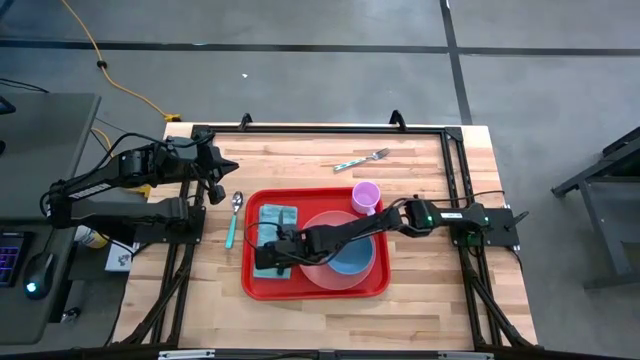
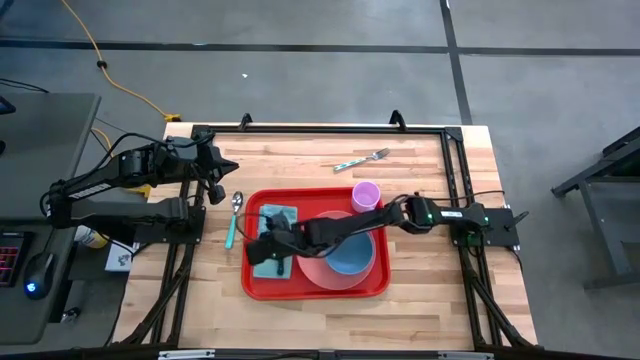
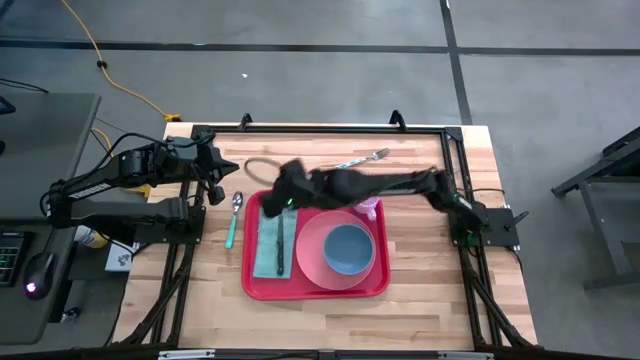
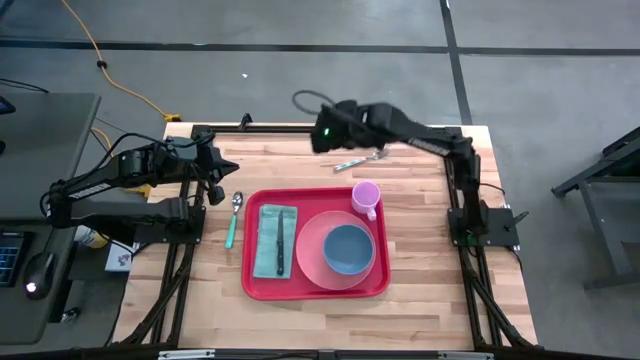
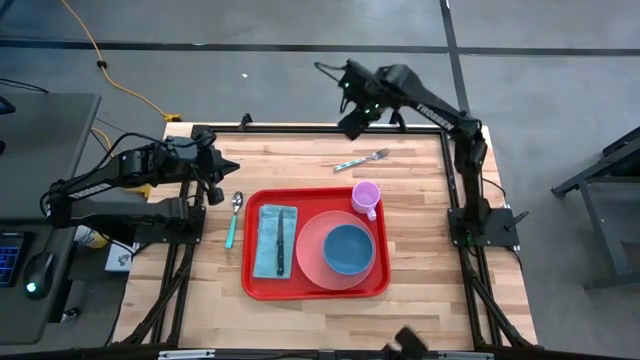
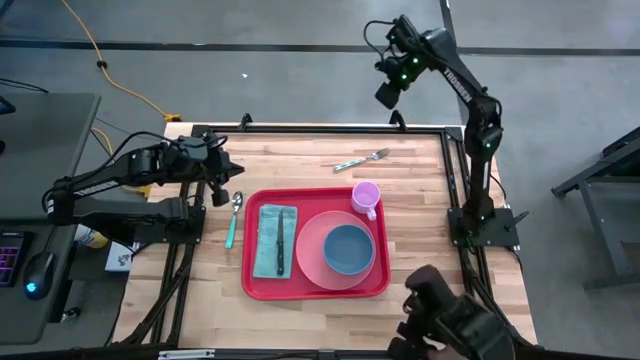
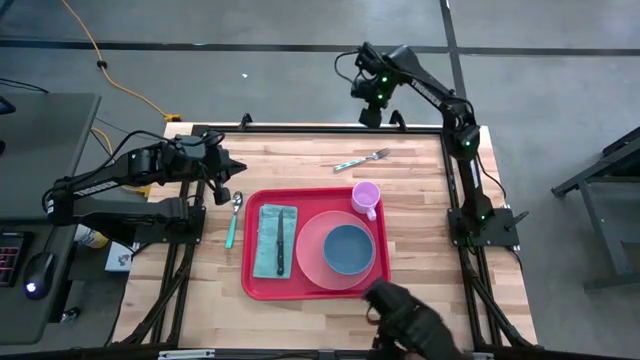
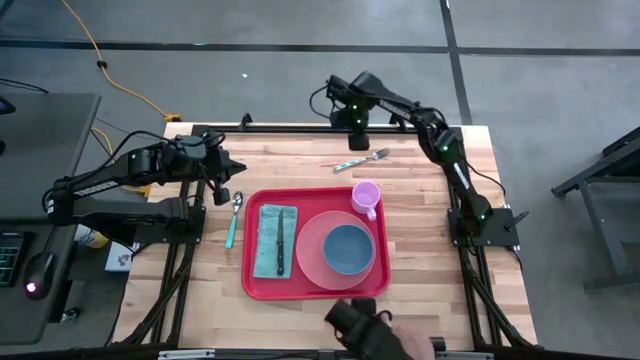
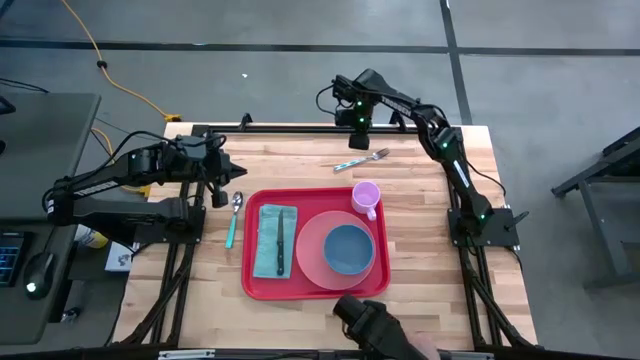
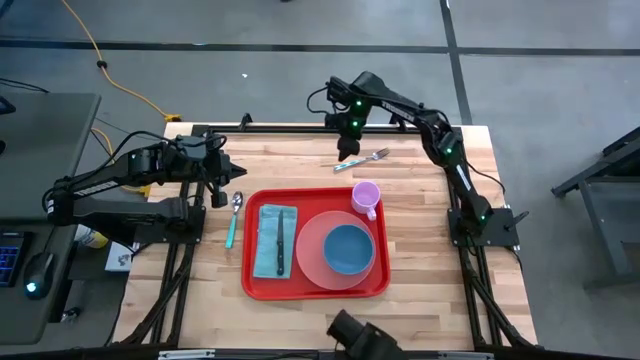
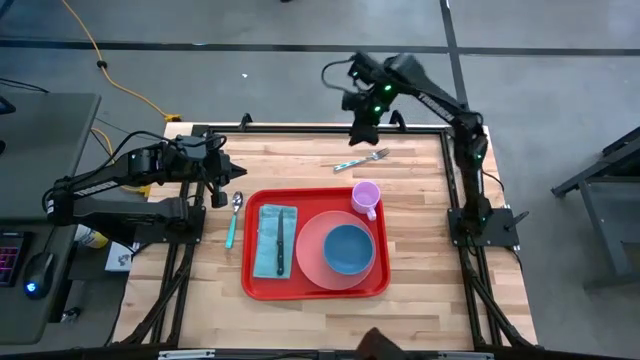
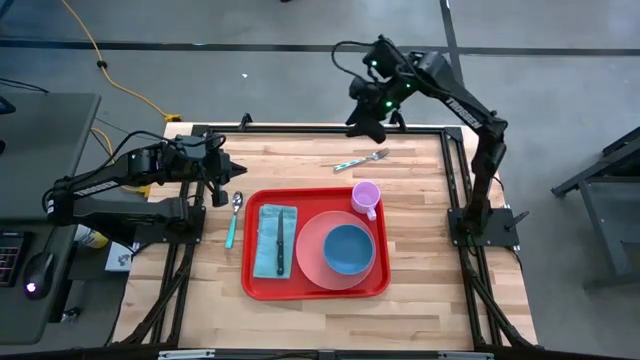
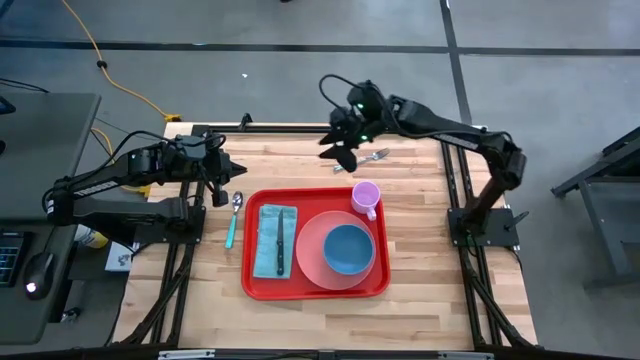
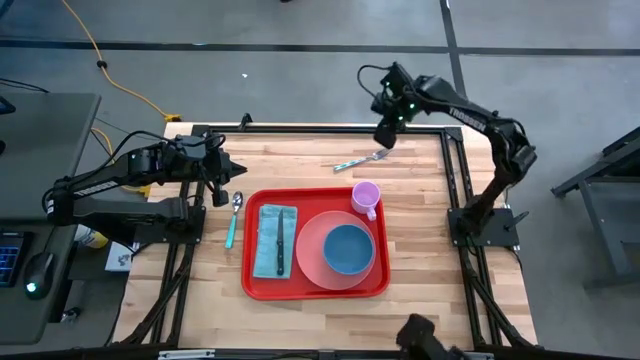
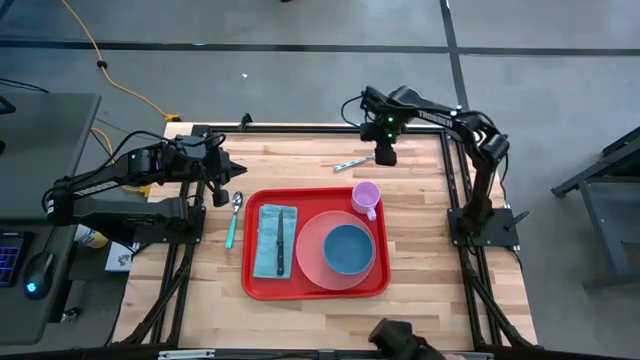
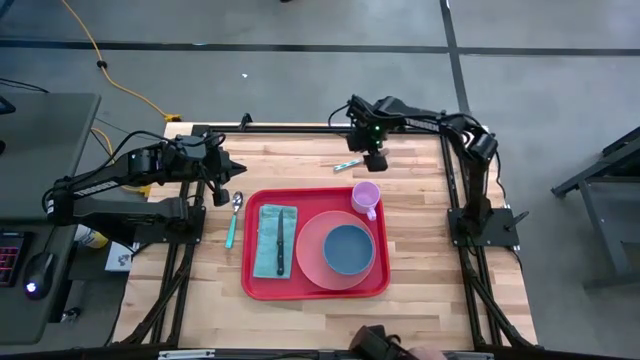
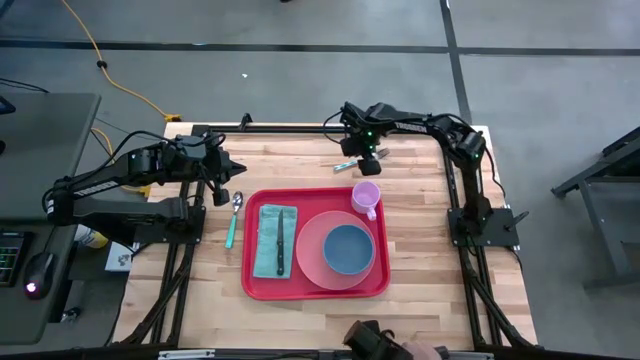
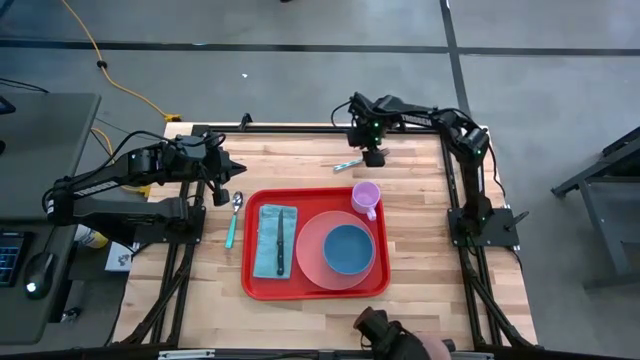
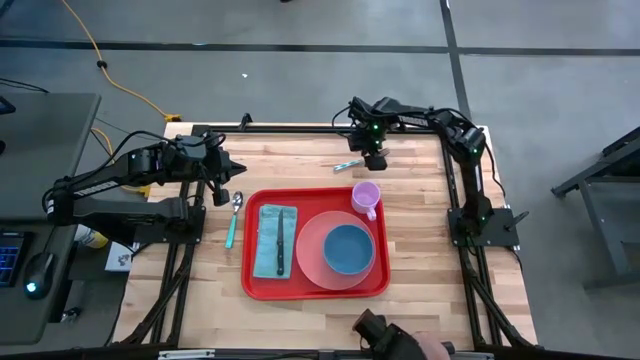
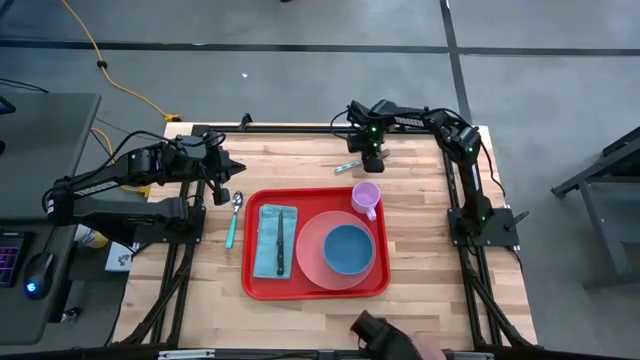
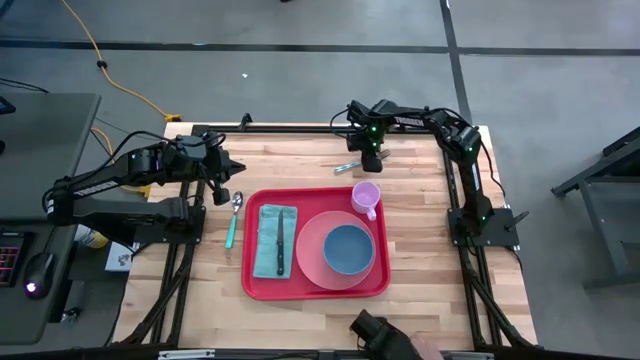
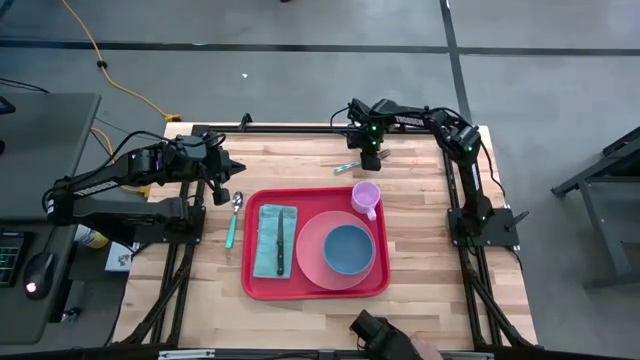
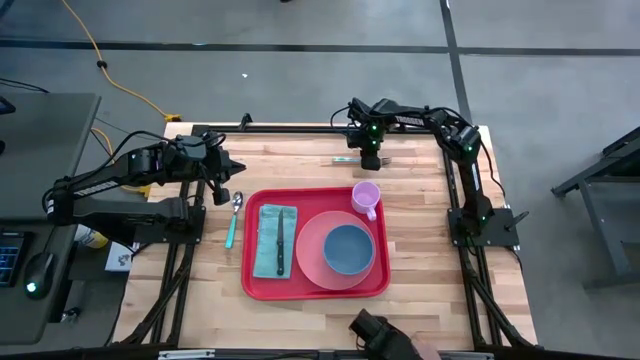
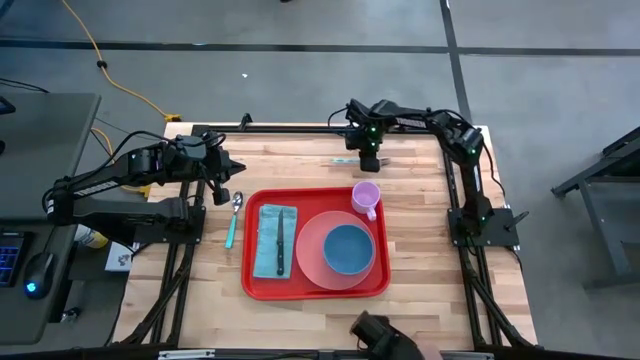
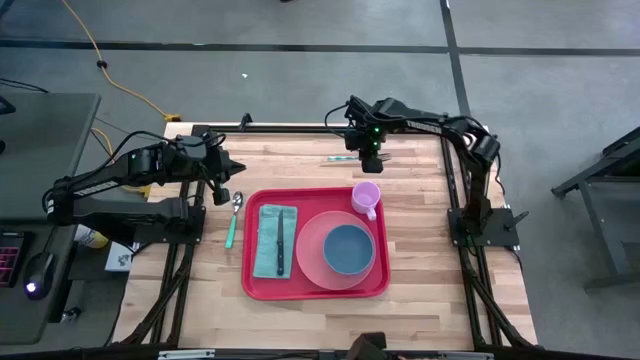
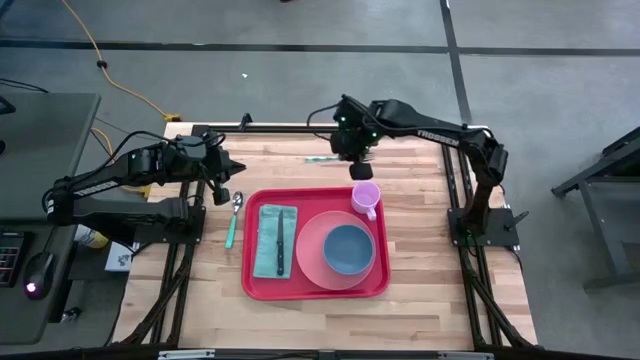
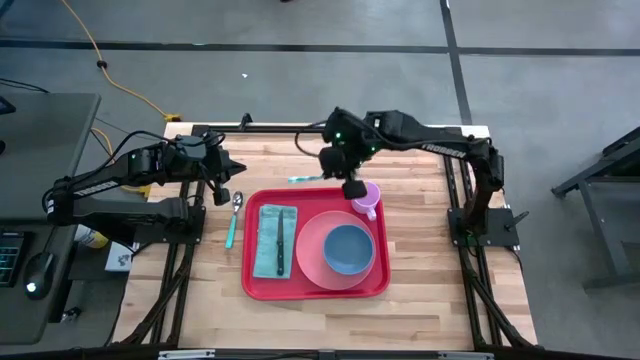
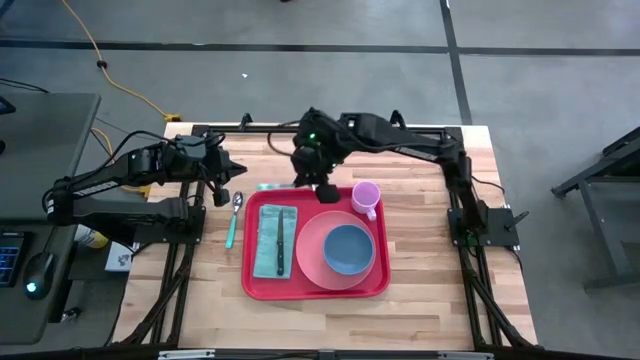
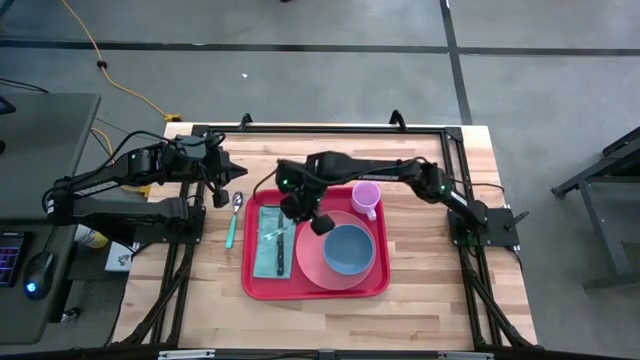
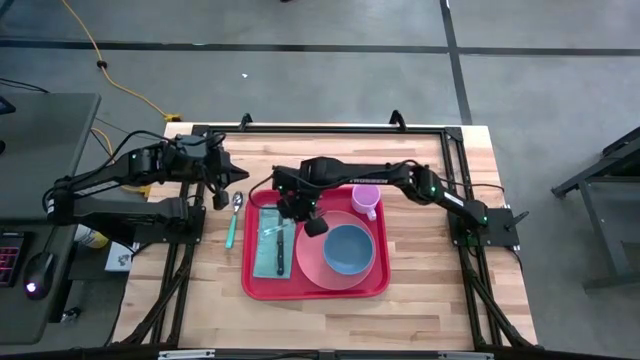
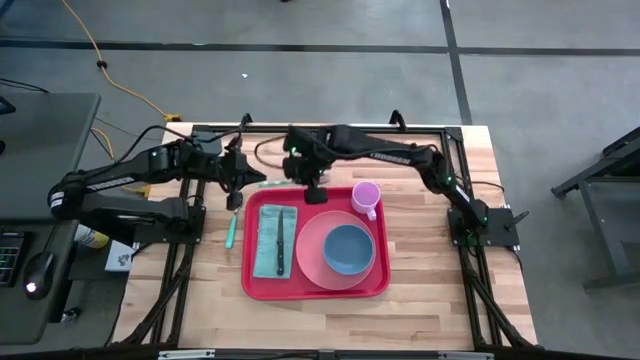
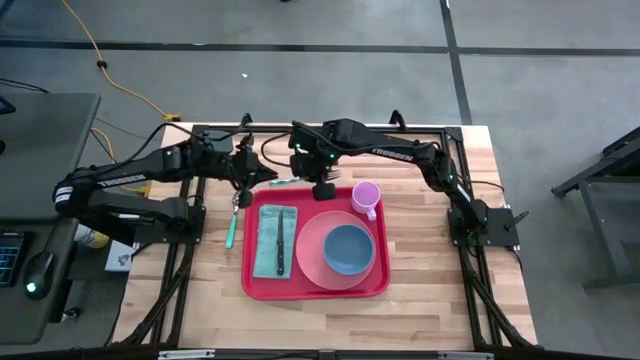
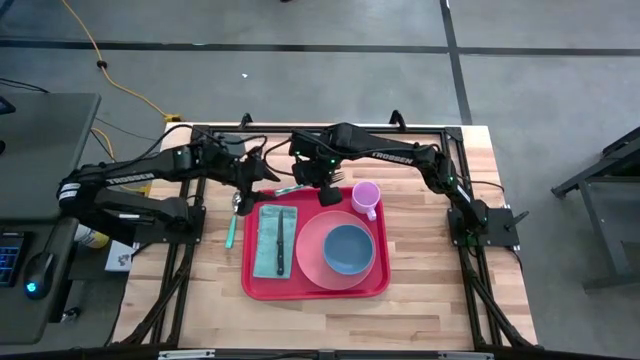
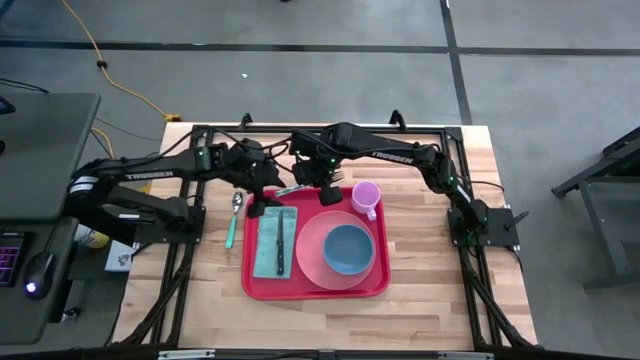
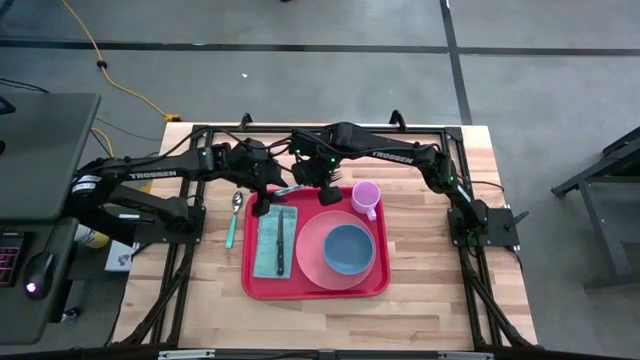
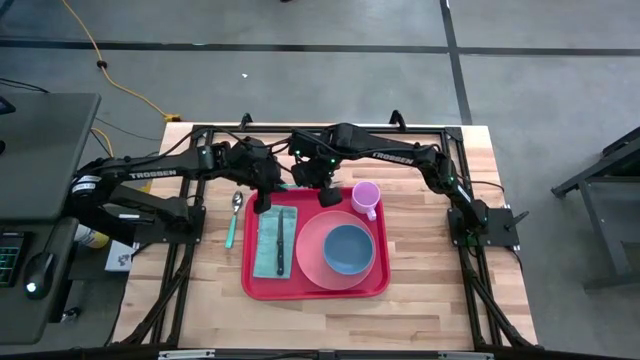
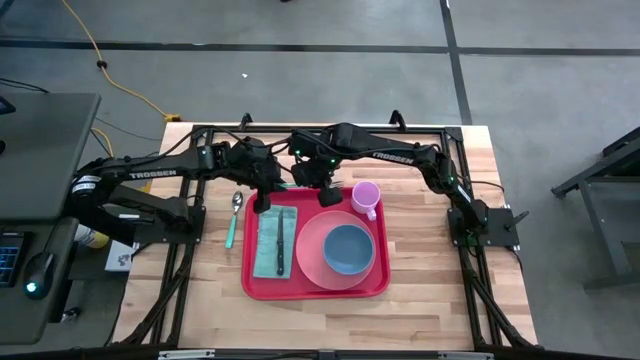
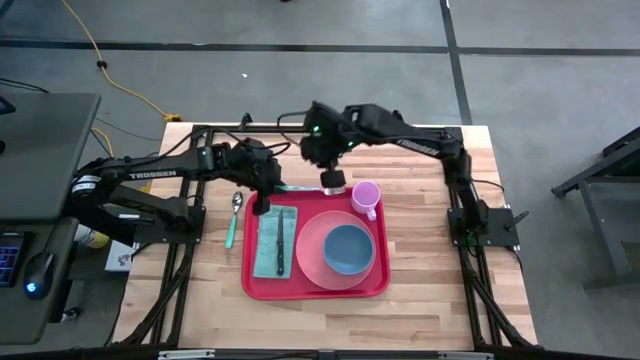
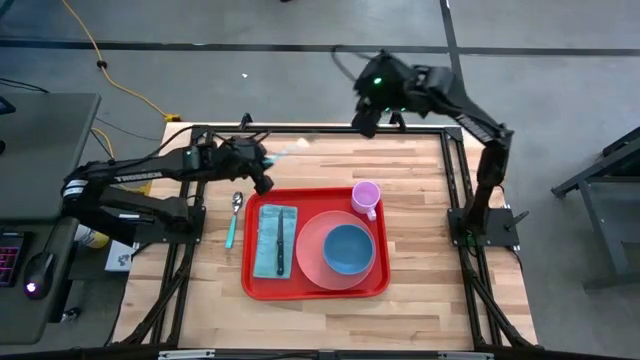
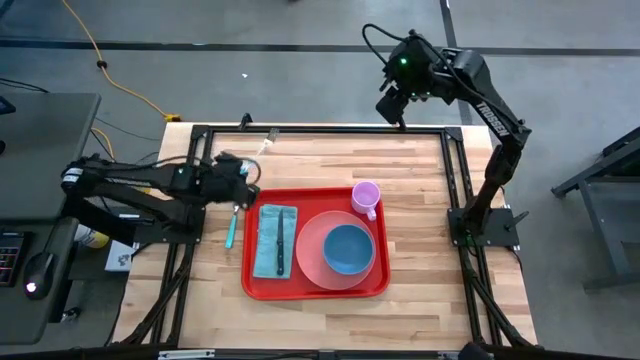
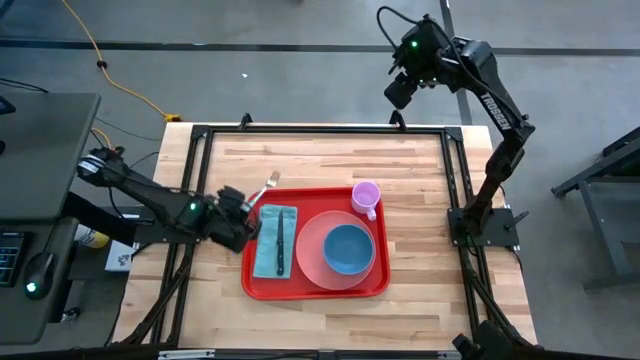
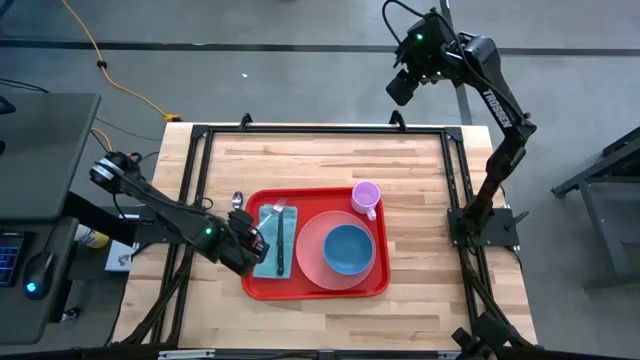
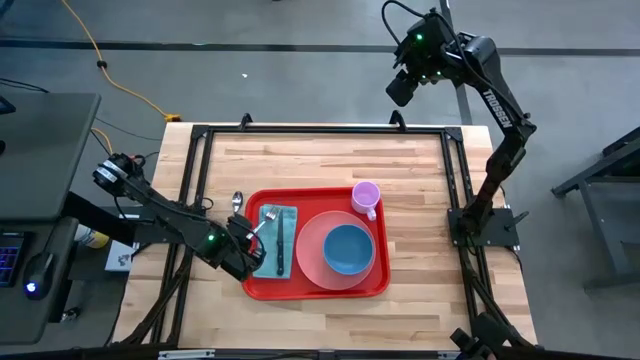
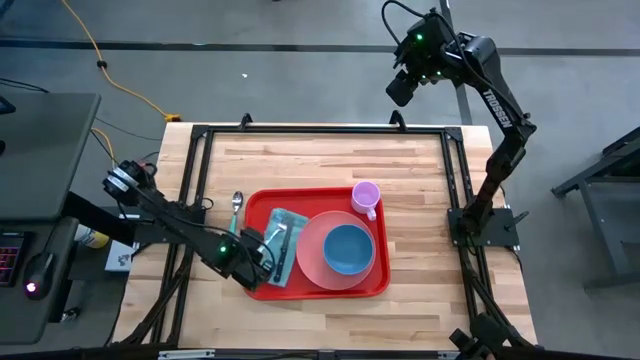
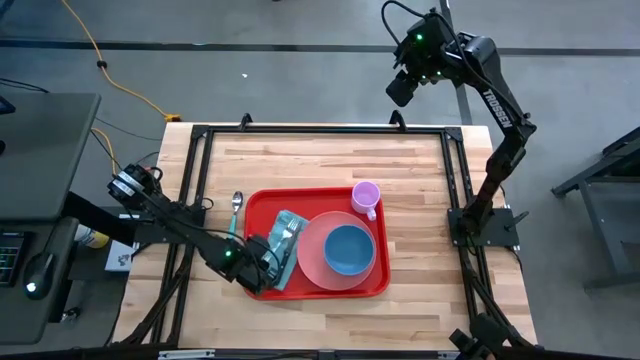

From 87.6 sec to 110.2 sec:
Task: Set up tray
Put the white blue fork on top of the blue napkin to the left of the black knife
